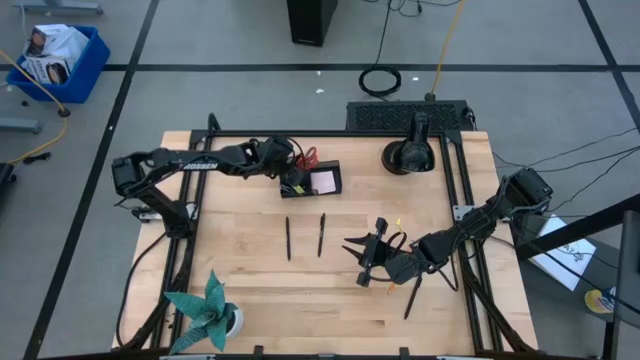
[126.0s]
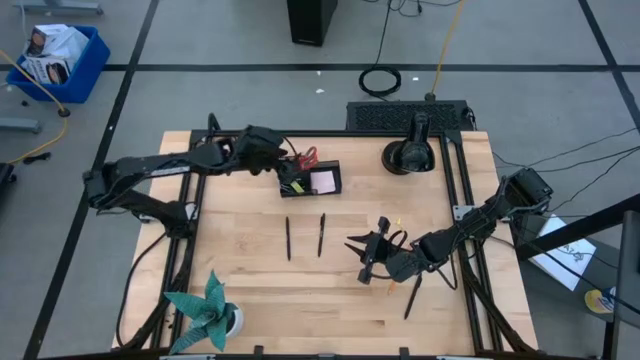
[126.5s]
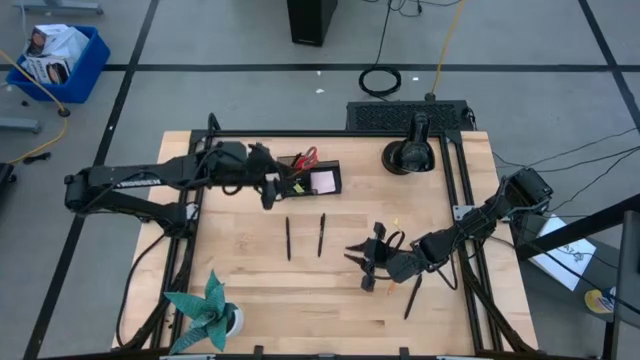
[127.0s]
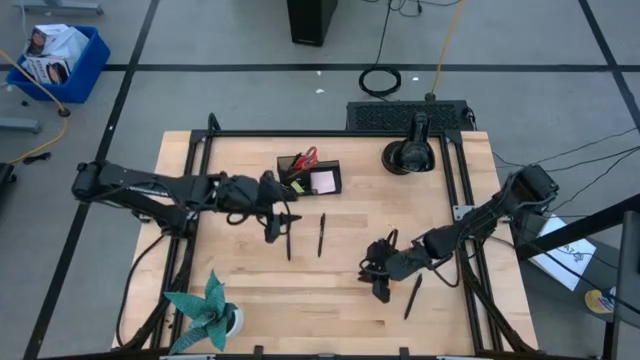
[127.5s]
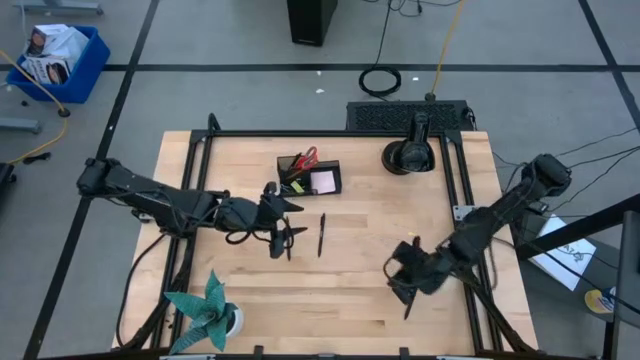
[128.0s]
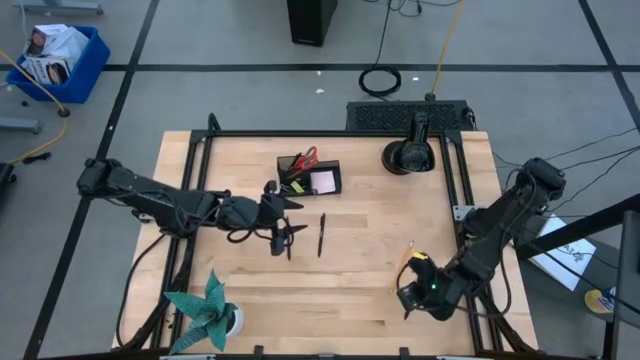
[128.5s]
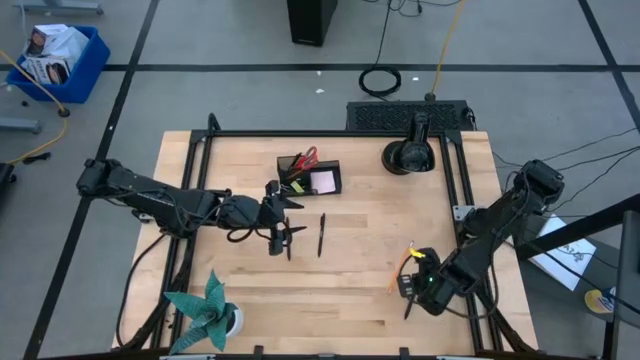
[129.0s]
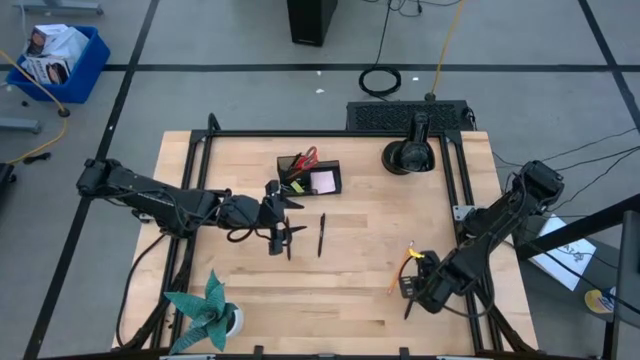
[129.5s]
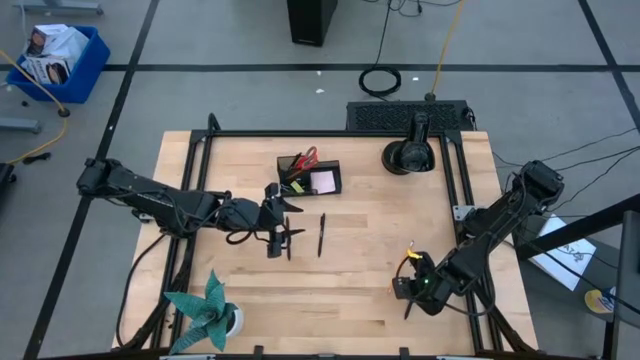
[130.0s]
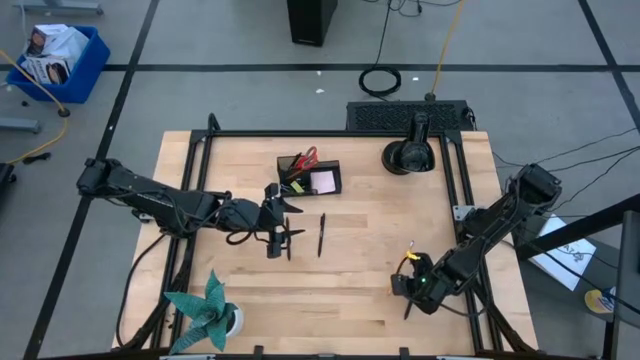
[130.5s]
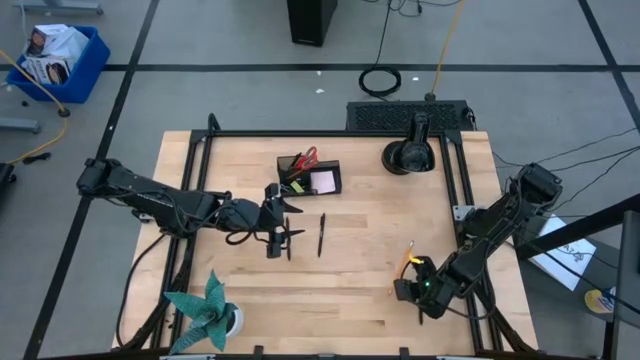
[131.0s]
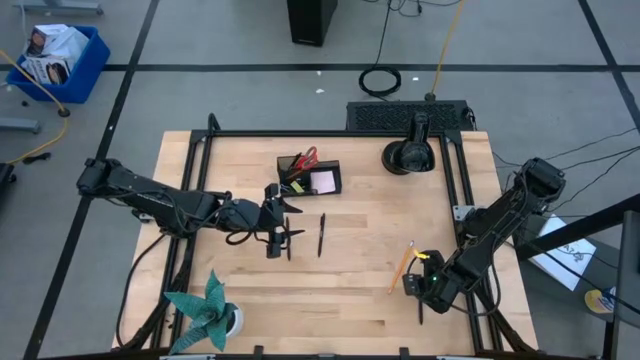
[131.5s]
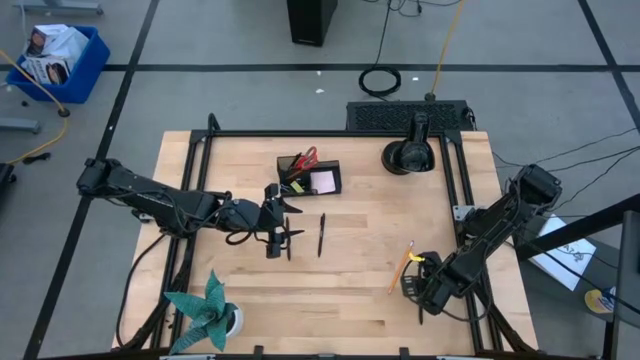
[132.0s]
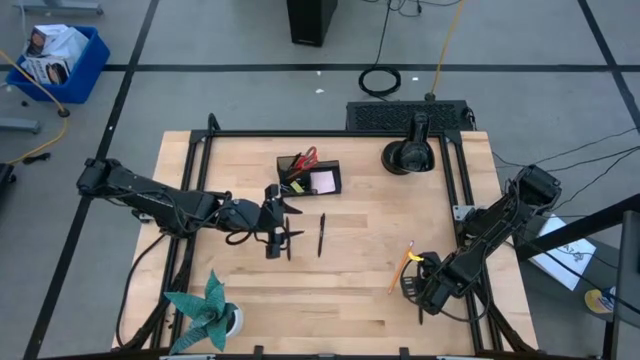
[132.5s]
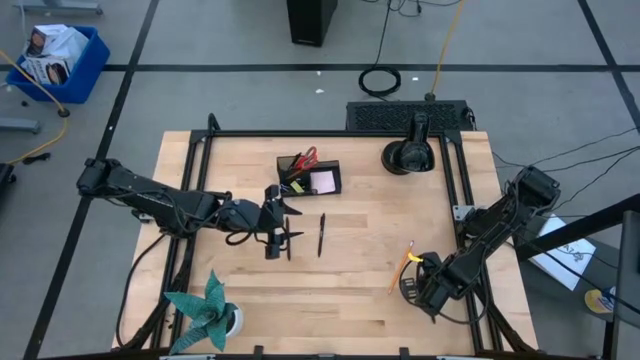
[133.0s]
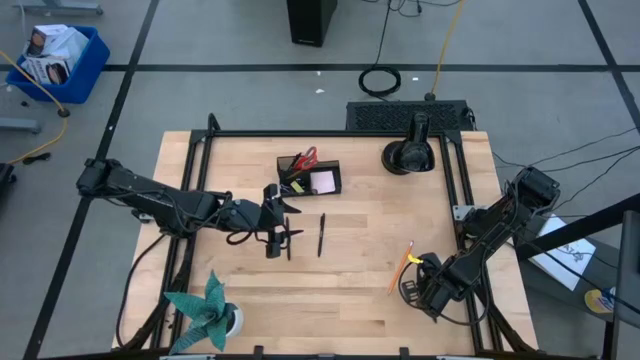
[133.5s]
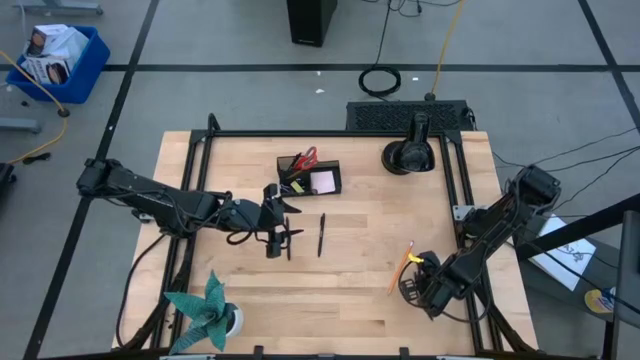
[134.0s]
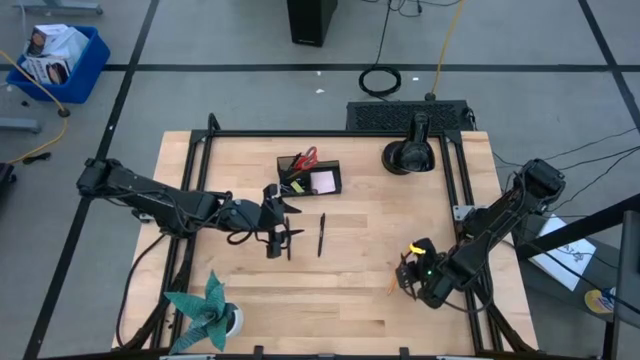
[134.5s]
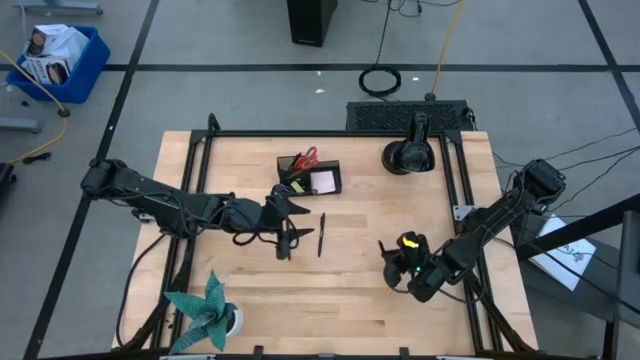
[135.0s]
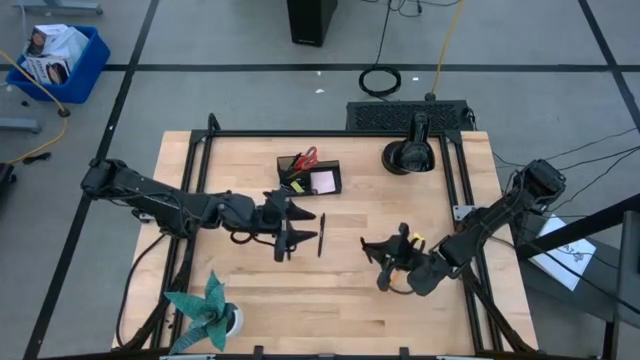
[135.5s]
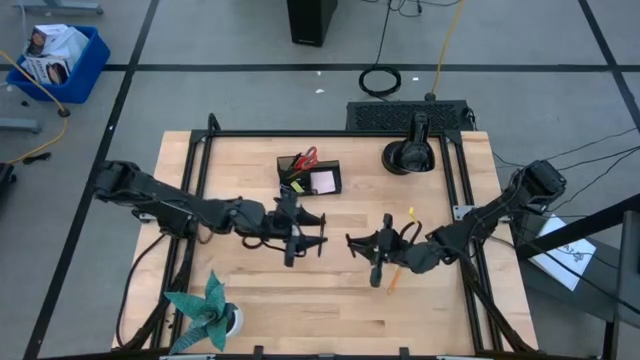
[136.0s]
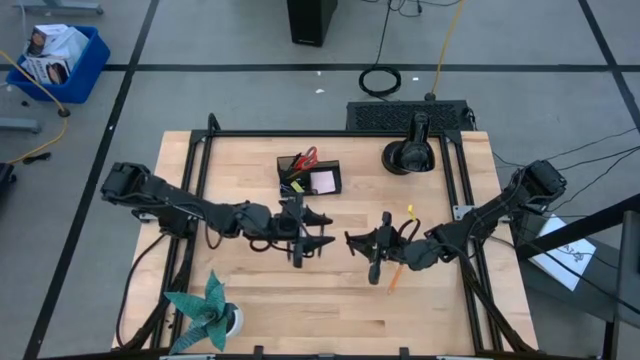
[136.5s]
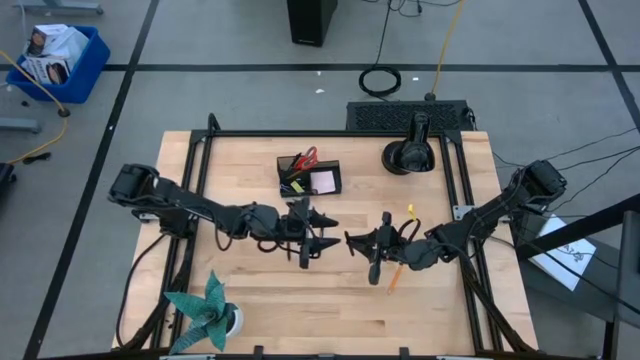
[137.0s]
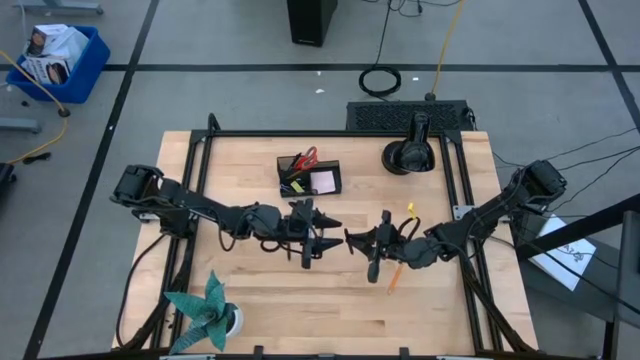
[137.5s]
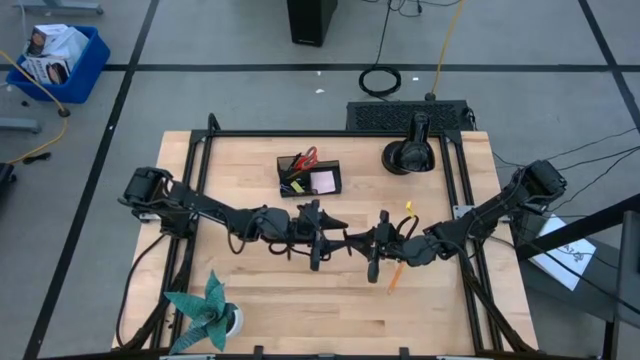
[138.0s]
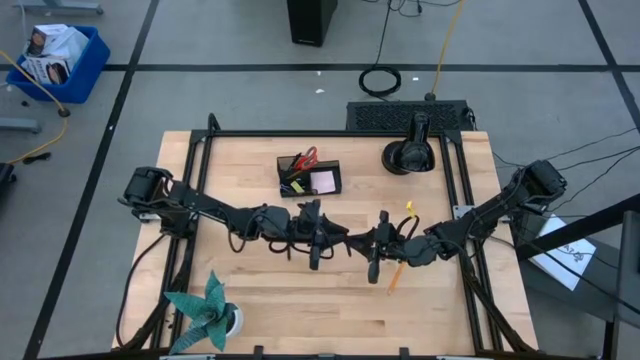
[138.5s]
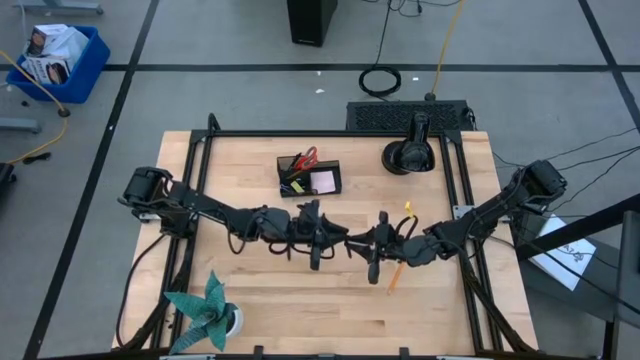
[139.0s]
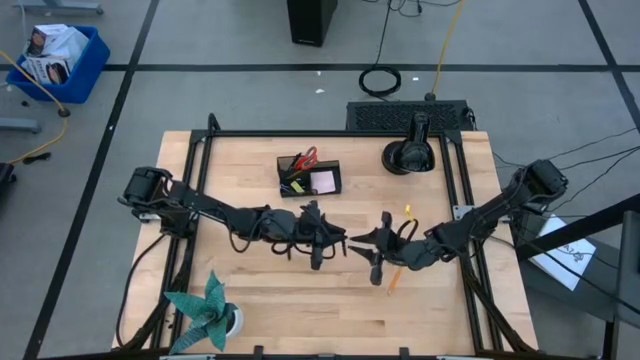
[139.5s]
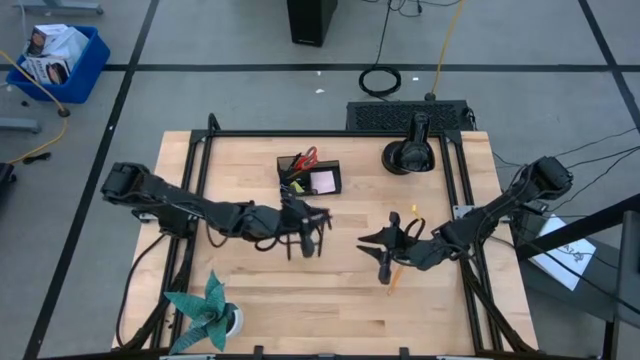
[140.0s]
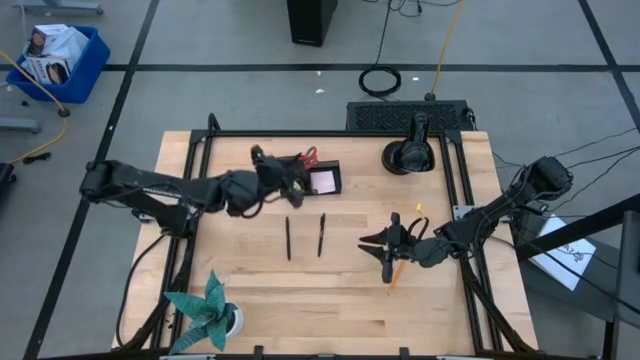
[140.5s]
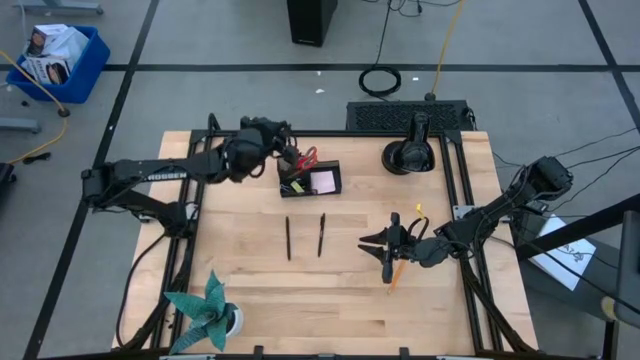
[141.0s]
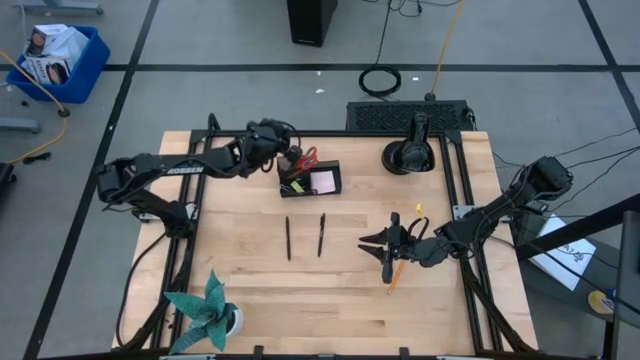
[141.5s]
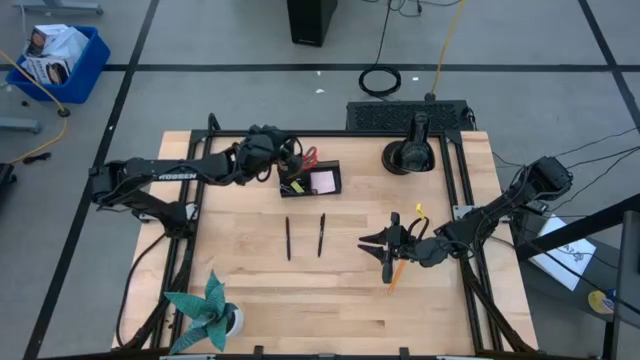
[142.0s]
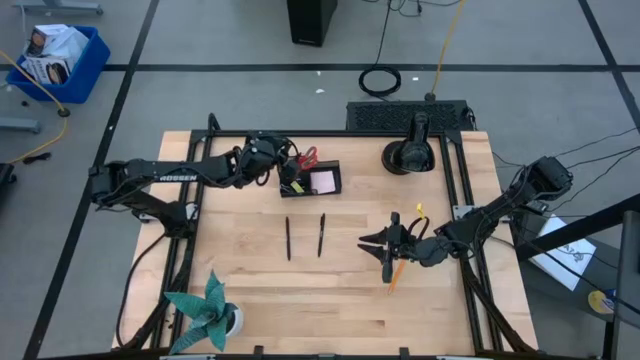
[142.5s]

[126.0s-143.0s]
Task: Pick and place office supplies into organizer
Put the black pen into the black desk organizer
